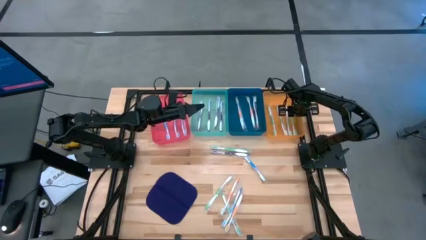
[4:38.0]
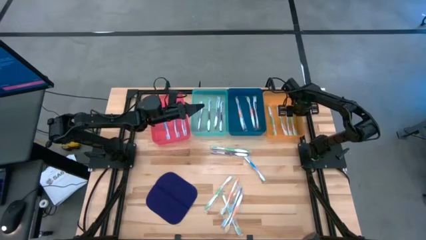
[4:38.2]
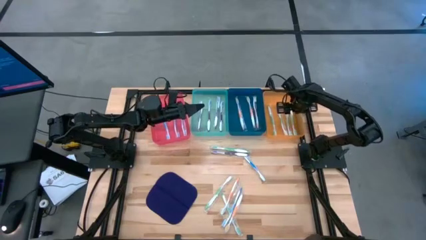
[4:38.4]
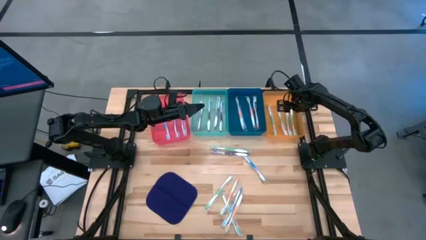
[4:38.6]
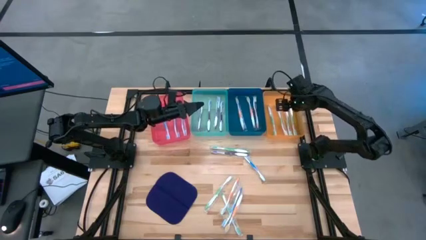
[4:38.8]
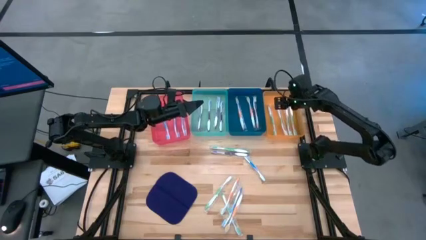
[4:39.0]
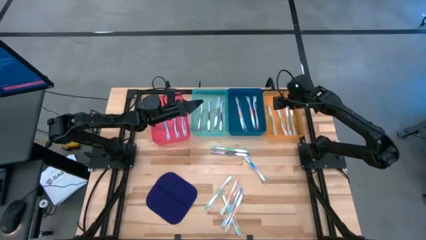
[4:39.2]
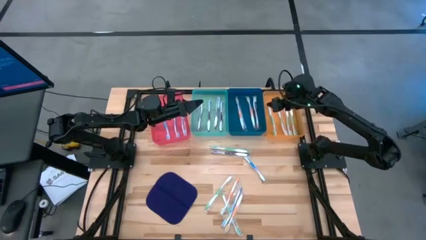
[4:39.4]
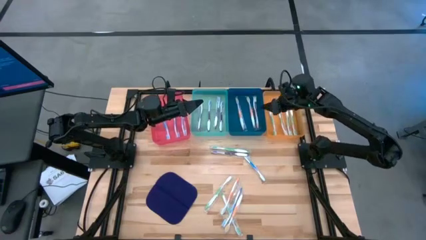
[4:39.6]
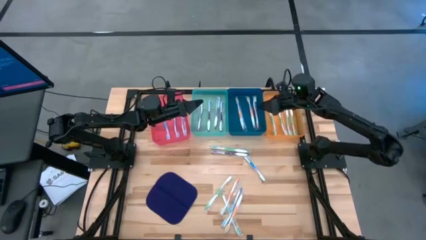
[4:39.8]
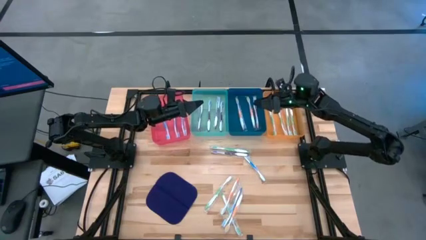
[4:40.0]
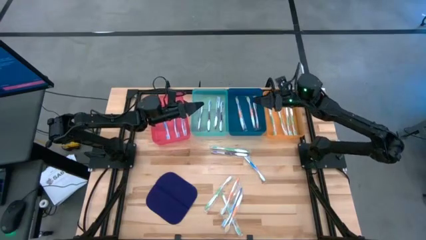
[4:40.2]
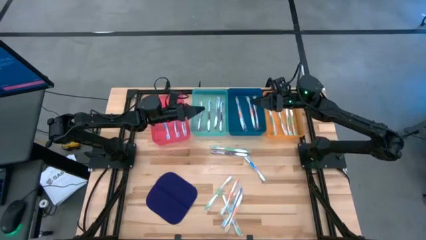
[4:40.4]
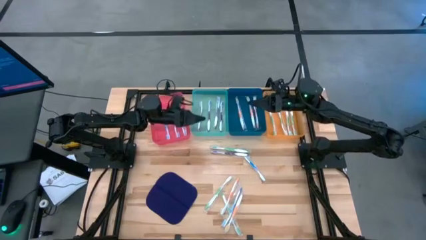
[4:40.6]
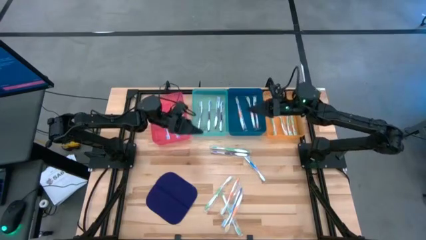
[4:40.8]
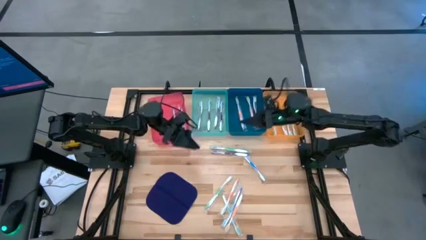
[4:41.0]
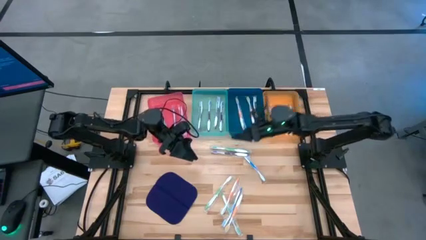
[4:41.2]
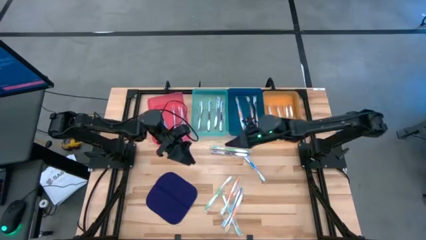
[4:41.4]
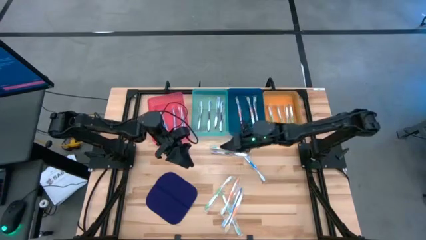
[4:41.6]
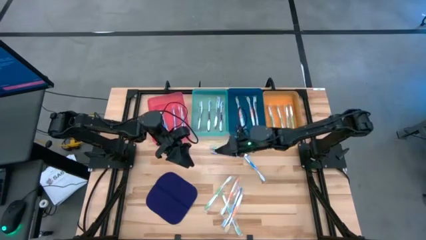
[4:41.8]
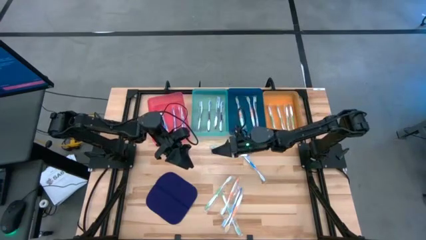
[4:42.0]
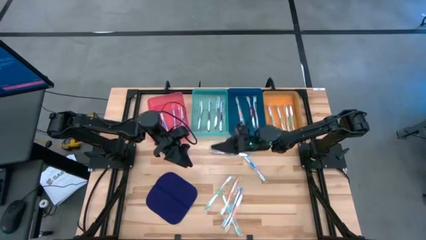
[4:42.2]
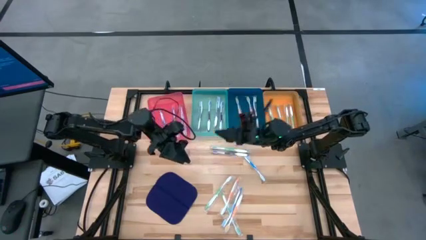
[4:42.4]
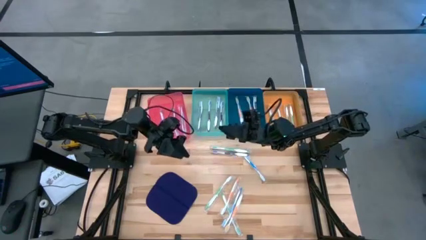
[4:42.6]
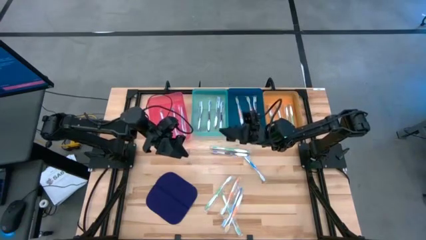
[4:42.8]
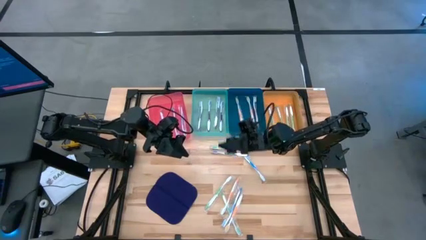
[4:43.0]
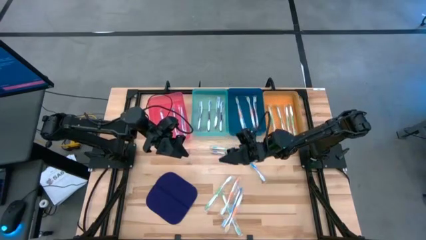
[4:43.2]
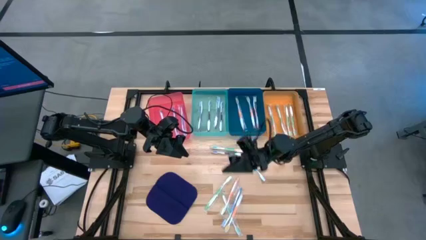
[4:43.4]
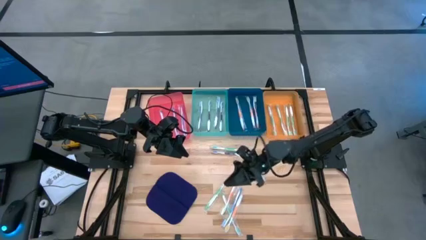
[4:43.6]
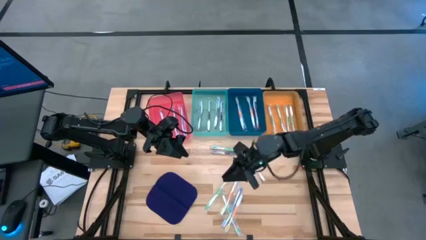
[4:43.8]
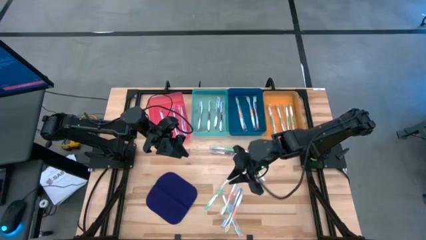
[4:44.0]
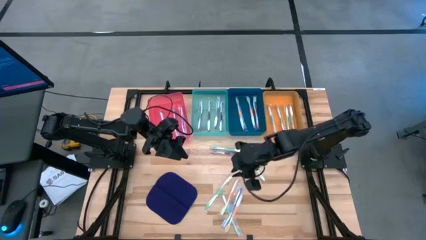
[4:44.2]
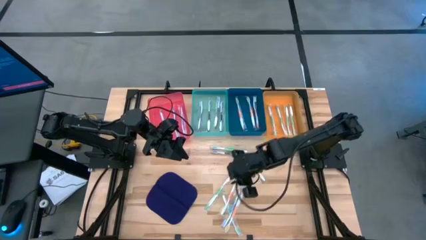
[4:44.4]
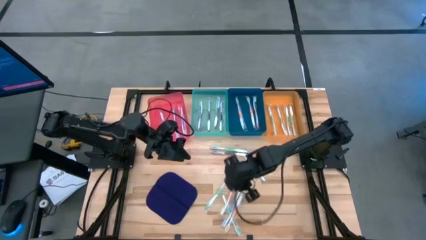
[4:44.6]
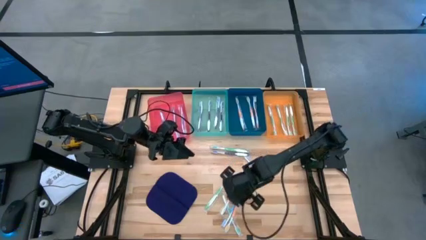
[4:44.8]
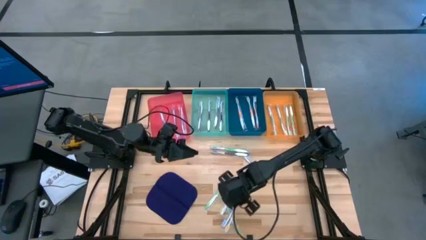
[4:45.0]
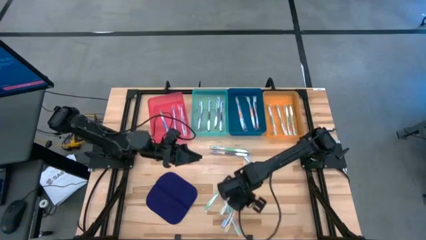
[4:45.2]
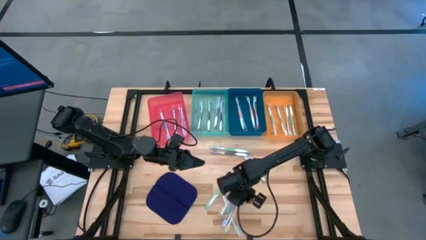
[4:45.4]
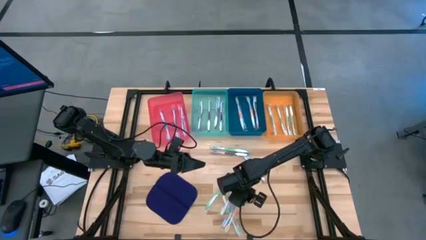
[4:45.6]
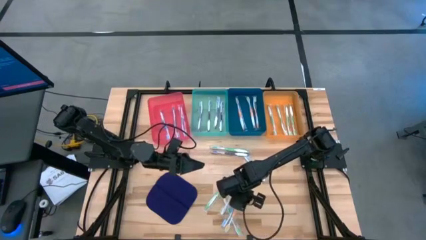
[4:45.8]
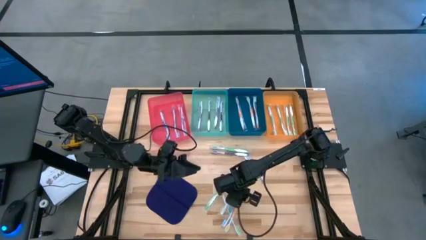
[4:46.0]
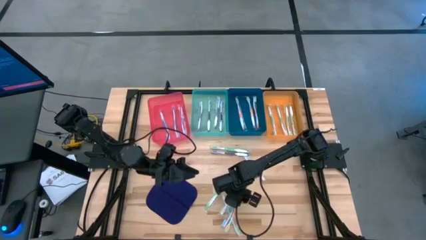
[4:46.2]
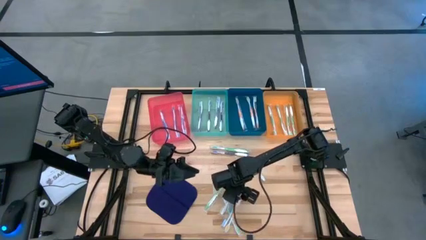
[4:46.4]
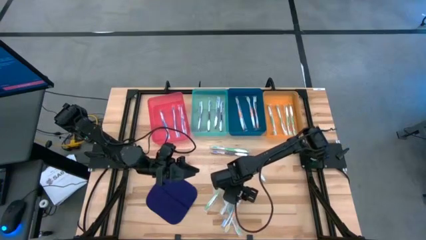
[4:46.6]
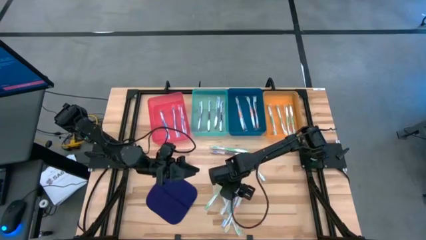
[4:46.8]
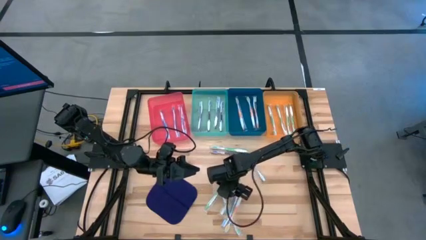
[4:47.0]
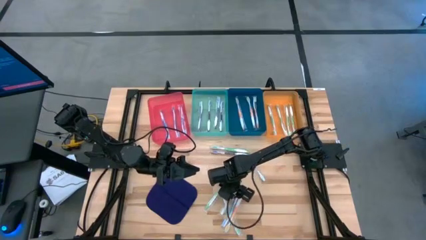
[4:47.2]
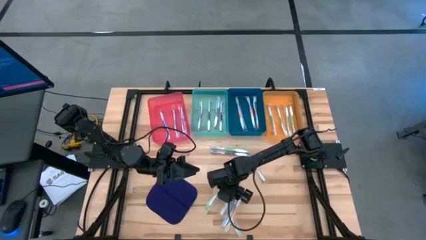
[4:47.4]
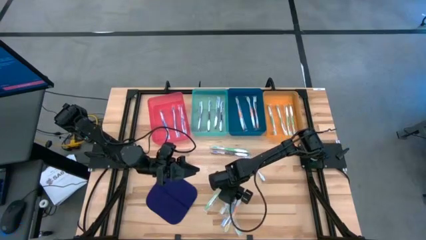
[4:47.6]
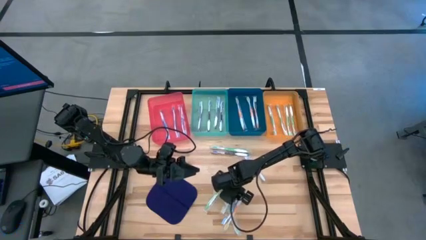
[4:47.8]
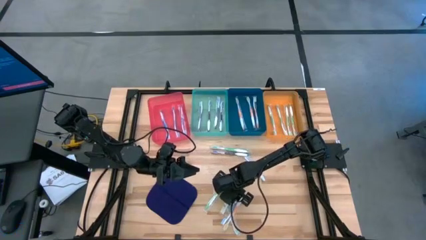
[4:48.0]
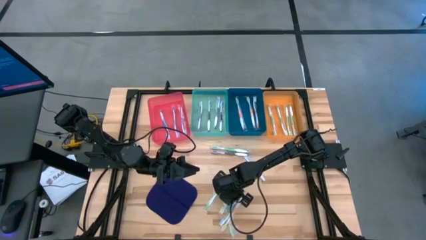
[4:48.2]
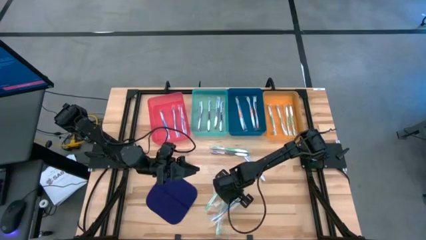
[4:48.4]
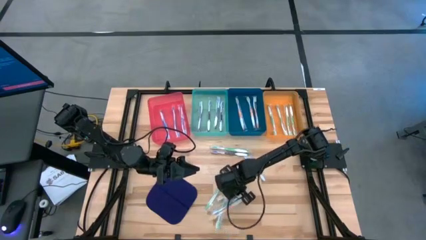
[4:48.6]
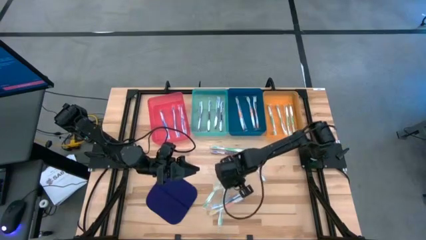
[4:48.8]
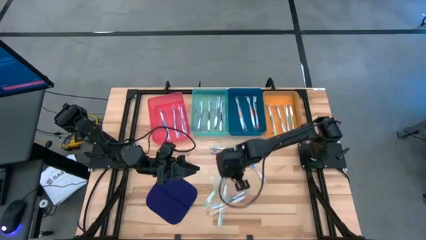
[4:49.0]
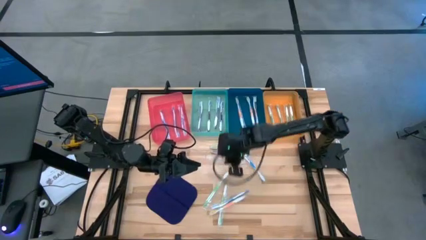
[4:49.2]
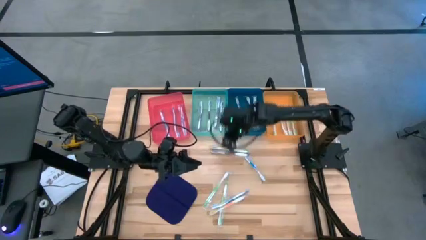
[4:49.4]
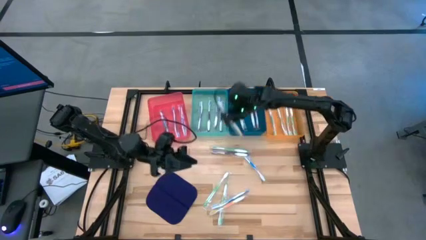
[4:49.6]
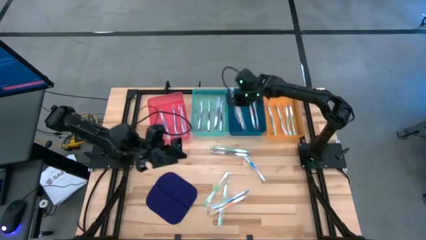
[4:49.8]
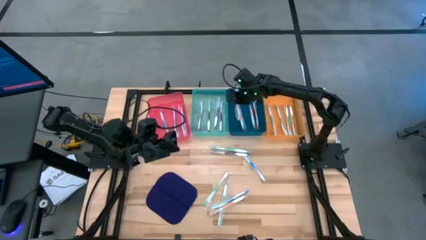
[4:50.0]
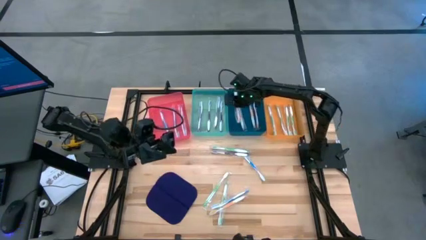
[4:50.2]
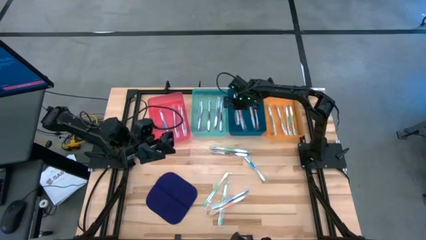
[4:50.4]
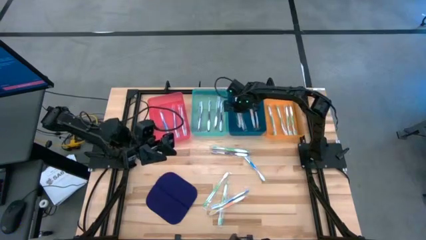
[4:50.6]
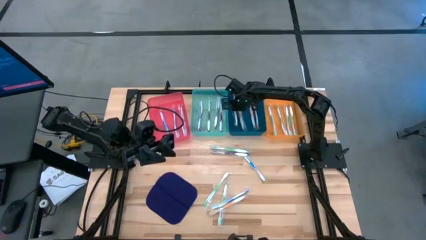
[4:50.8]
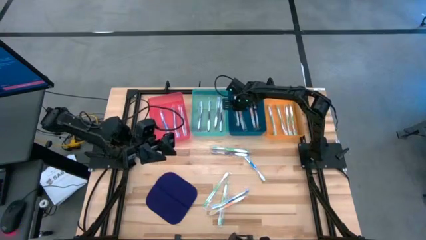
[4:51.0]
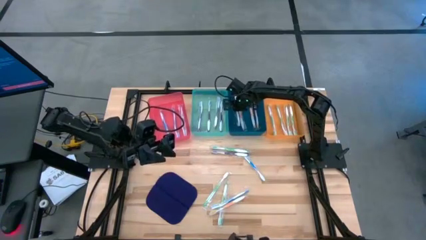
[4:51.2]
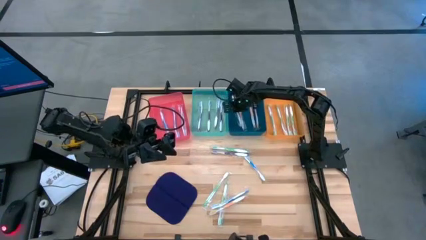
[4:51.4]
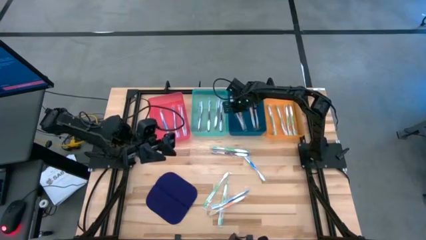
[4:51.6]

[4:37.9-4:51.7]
Task: Pick & Place Toothbrushes
Put the orange toothbrush into the blue bin

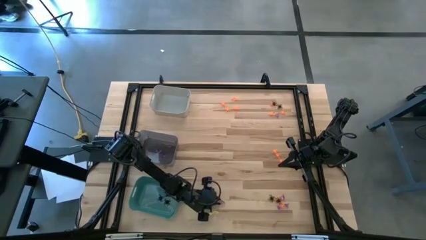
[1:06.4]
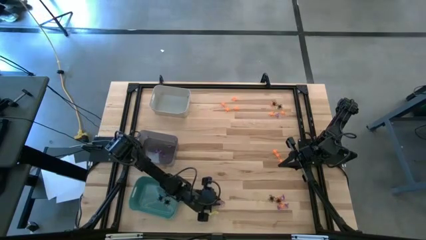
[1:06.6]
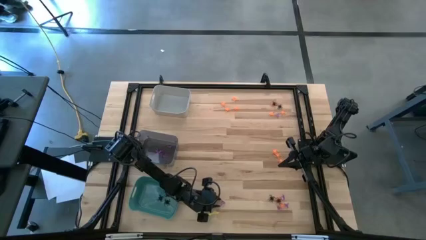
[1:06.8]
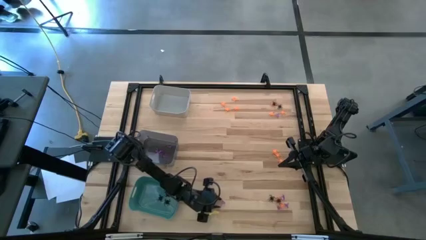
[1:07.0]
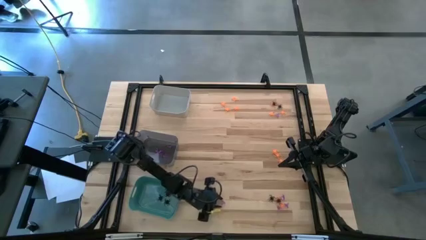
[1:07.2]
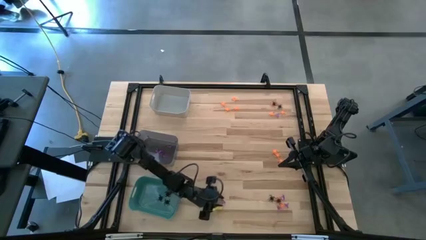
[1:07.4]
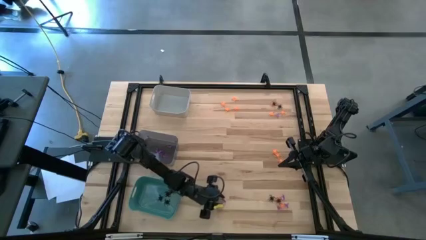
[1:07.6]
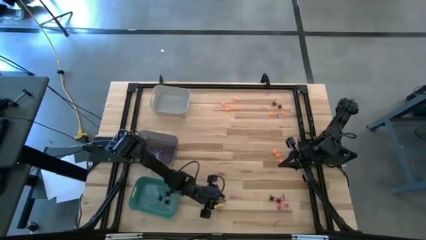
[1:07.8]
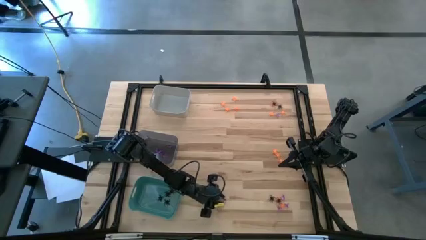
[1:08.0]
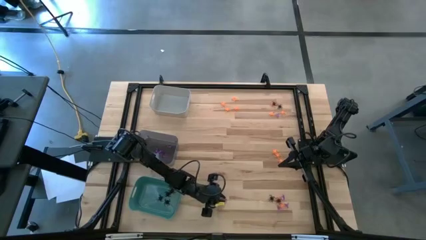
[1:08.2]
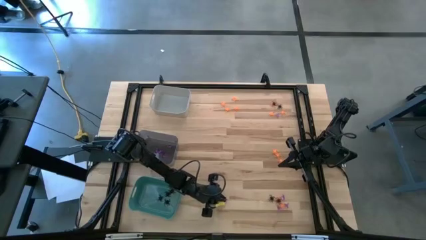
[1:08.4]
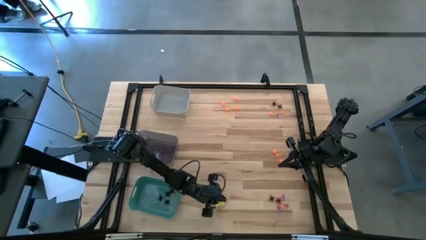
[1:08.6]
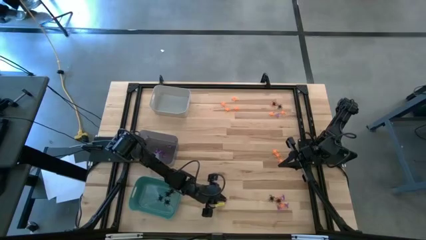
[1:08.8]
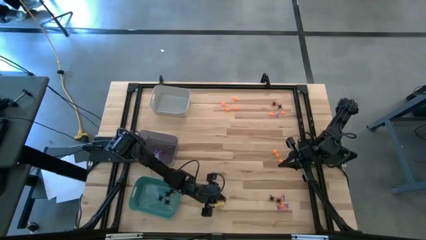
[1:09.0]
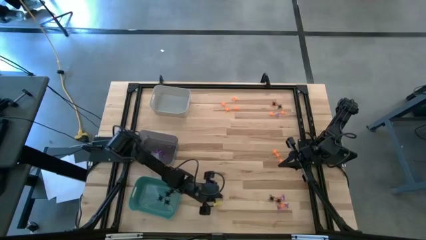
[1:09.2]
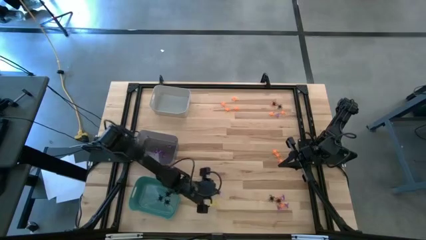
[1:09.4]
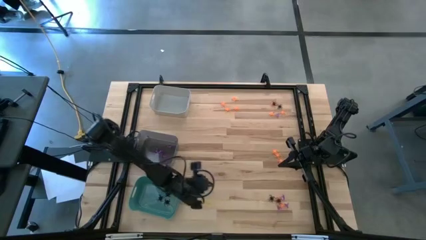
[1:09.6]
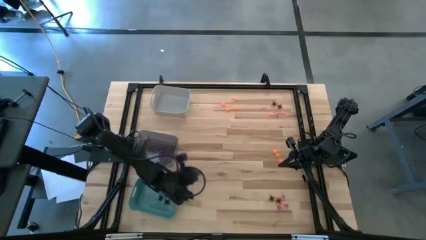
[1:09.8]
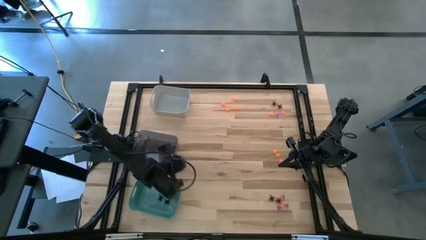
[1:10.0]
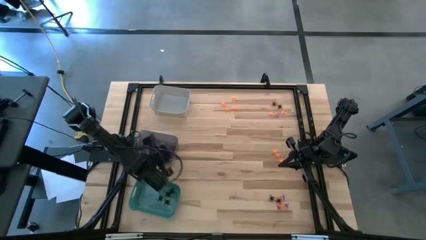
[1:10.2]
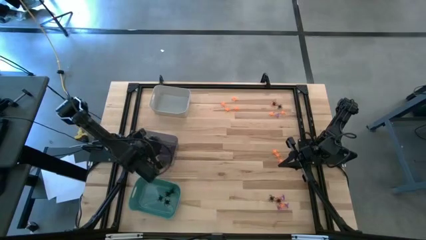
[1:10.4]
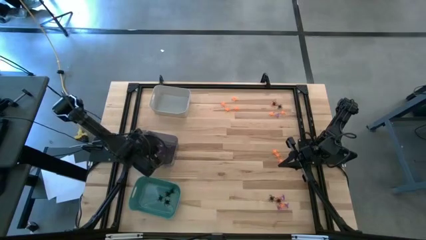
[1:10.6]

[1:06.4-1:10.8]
Task: Sort Halloween decoration
Put the bottom center violet witch hat into the black bin
